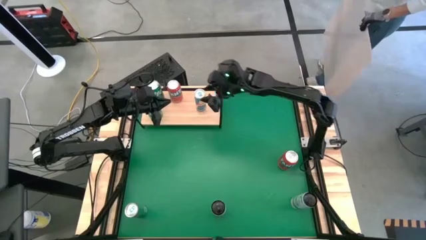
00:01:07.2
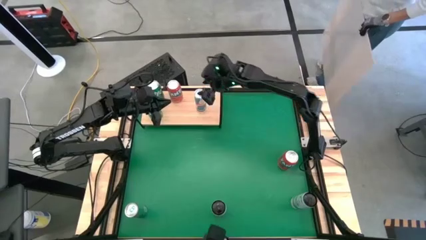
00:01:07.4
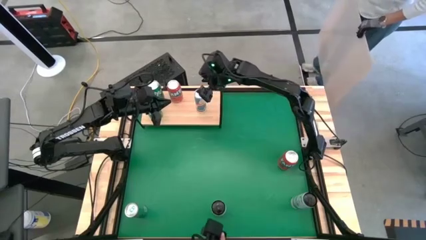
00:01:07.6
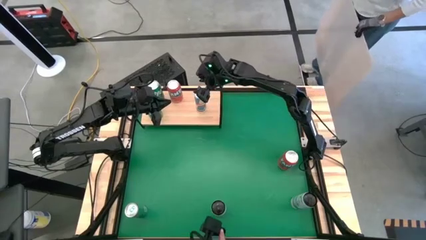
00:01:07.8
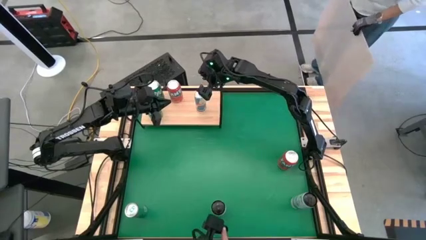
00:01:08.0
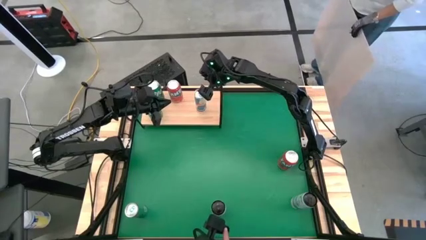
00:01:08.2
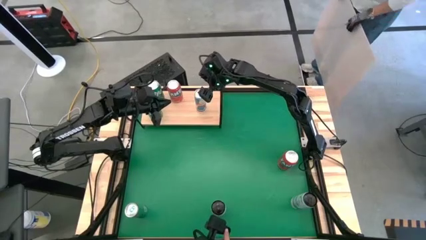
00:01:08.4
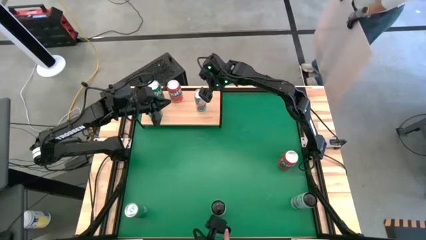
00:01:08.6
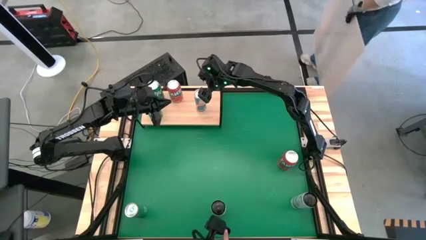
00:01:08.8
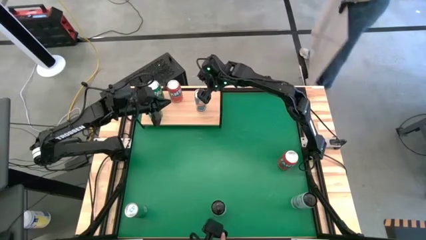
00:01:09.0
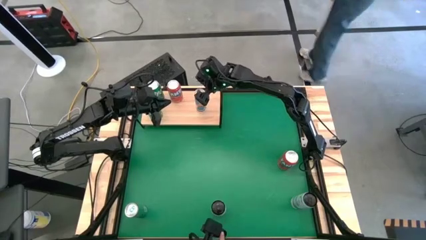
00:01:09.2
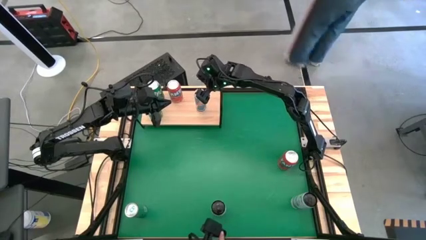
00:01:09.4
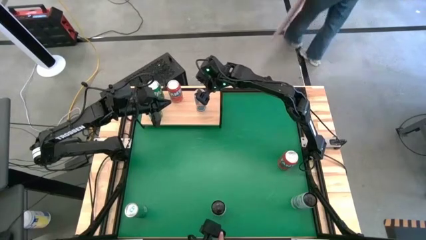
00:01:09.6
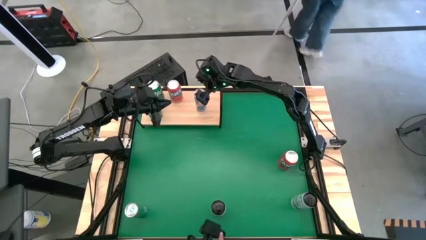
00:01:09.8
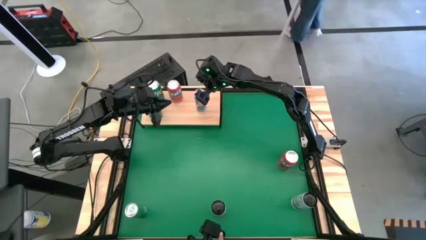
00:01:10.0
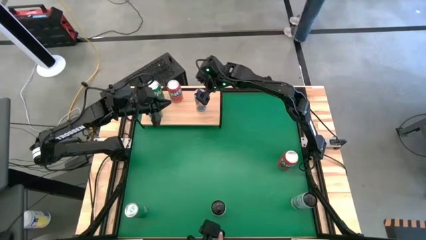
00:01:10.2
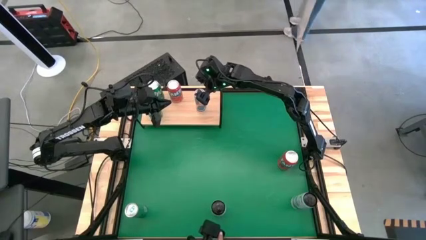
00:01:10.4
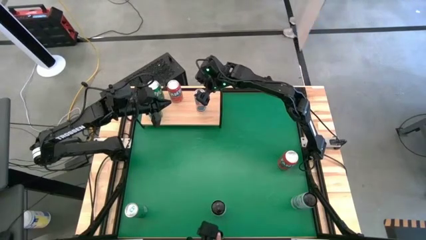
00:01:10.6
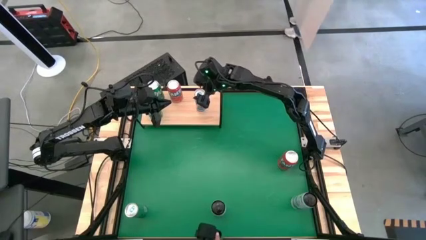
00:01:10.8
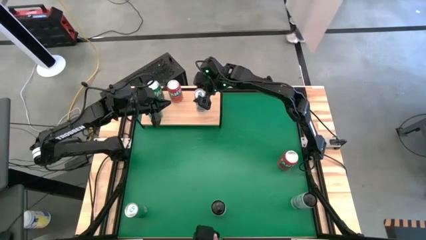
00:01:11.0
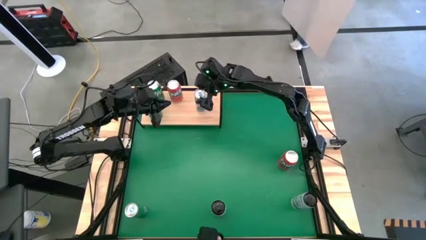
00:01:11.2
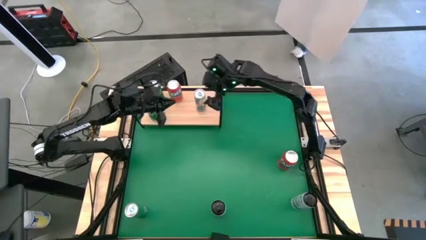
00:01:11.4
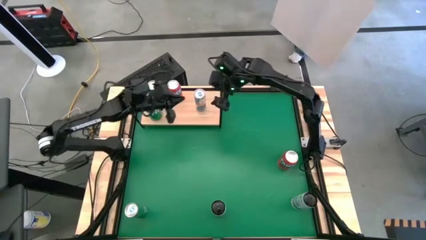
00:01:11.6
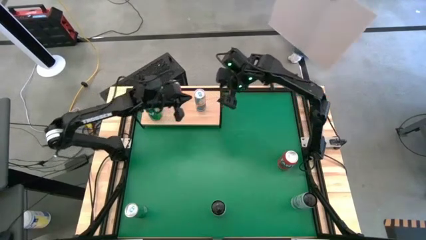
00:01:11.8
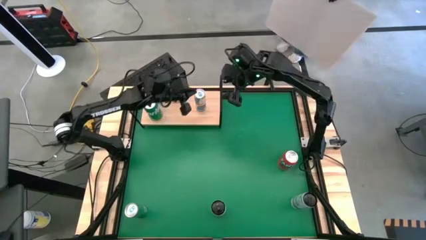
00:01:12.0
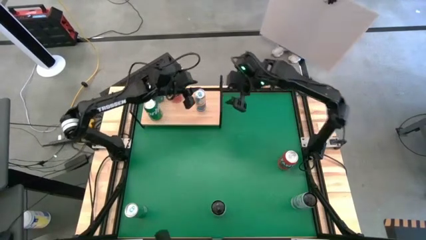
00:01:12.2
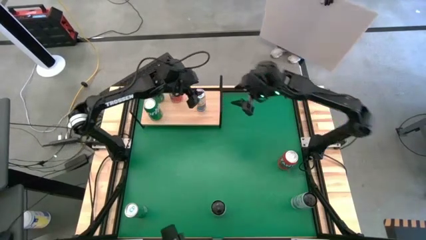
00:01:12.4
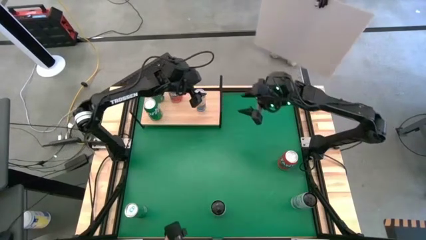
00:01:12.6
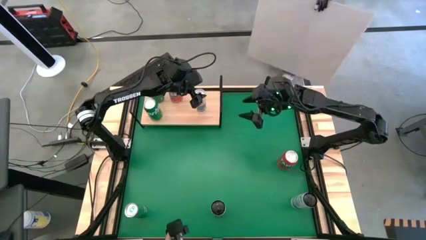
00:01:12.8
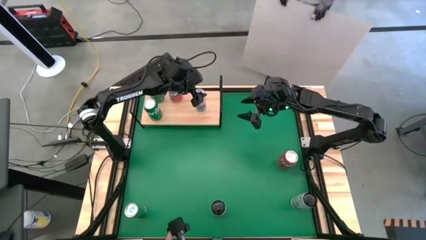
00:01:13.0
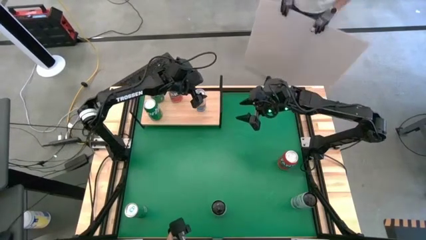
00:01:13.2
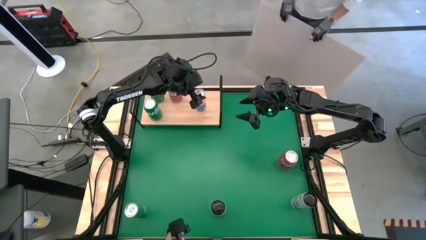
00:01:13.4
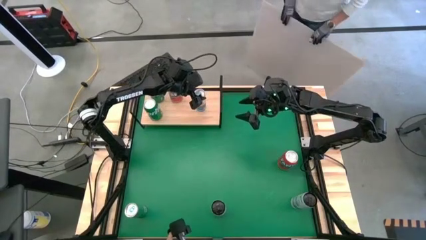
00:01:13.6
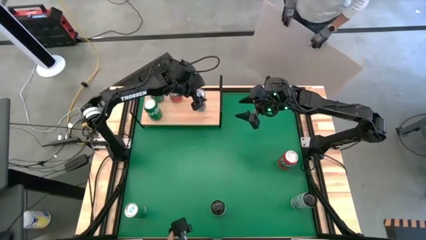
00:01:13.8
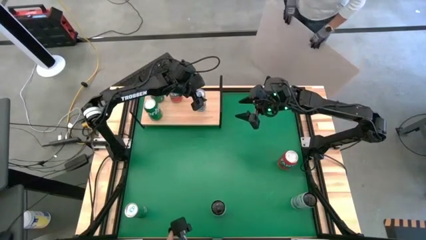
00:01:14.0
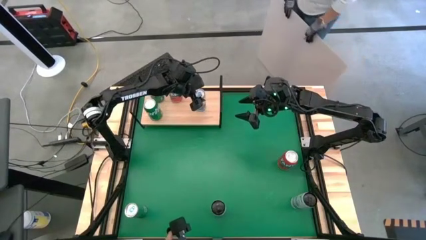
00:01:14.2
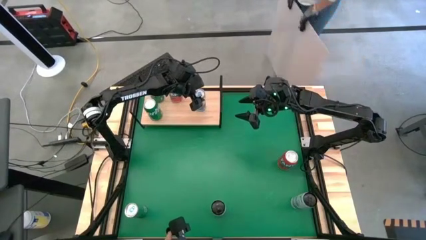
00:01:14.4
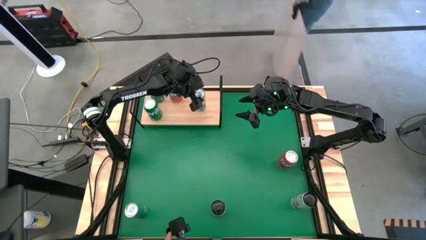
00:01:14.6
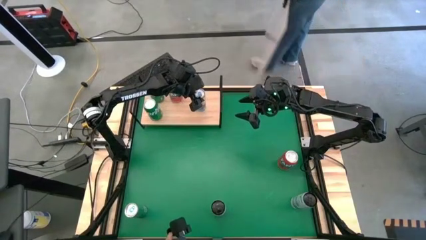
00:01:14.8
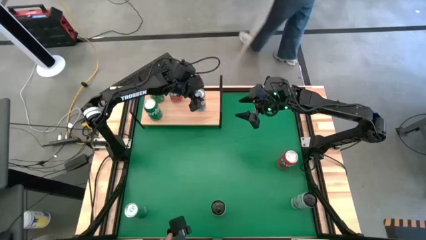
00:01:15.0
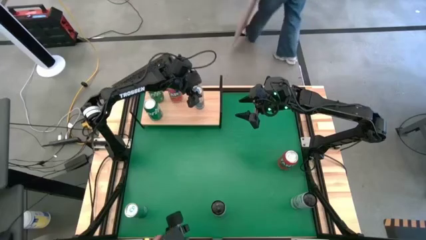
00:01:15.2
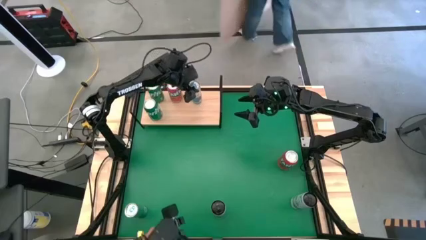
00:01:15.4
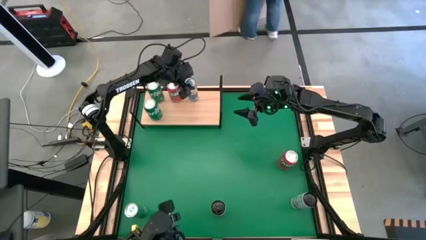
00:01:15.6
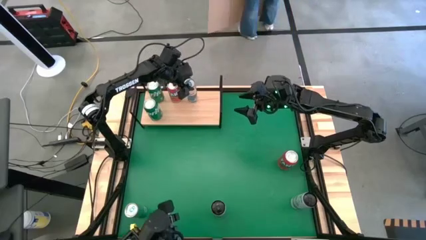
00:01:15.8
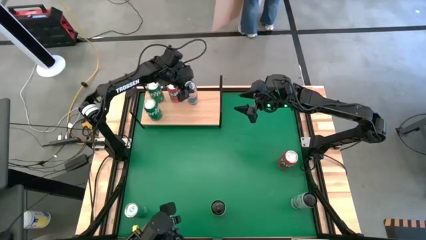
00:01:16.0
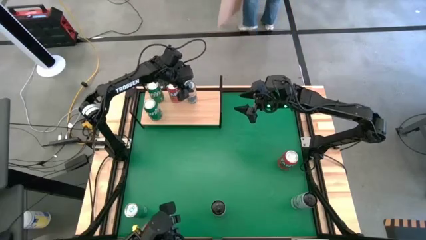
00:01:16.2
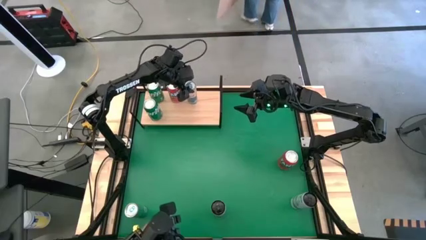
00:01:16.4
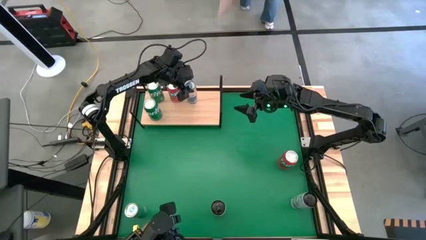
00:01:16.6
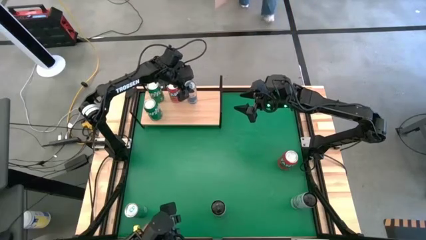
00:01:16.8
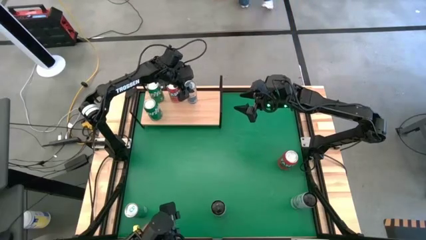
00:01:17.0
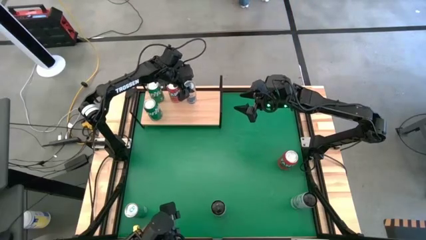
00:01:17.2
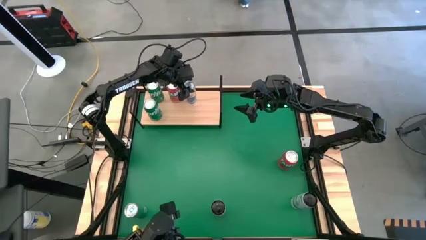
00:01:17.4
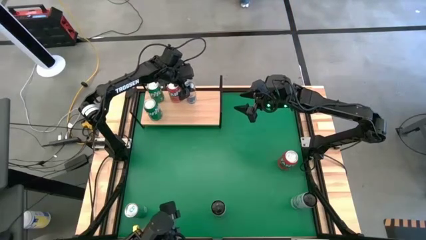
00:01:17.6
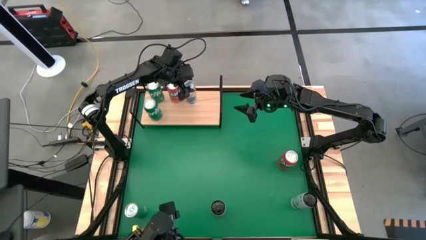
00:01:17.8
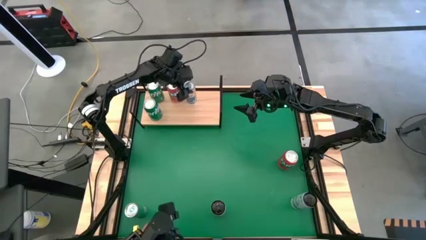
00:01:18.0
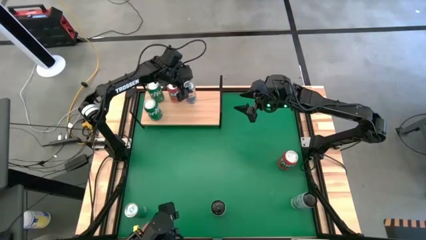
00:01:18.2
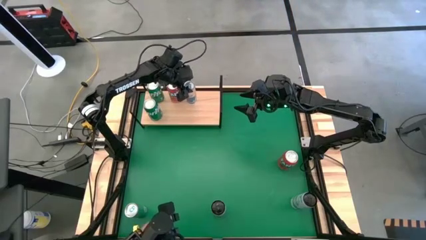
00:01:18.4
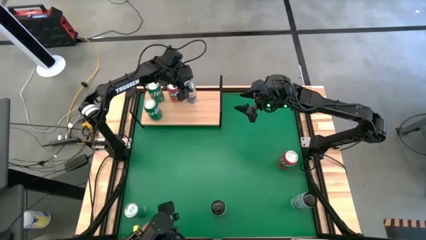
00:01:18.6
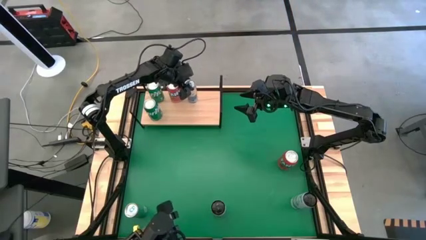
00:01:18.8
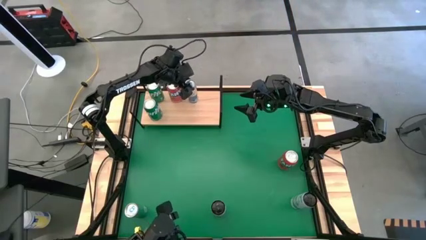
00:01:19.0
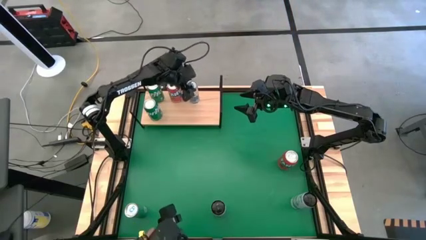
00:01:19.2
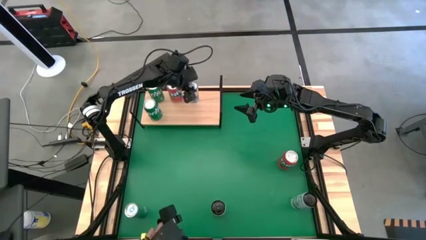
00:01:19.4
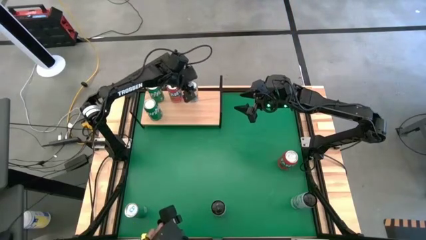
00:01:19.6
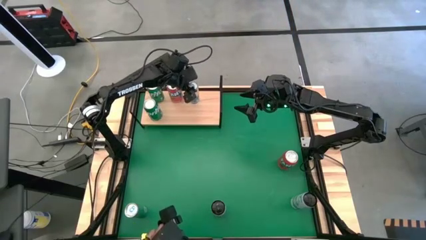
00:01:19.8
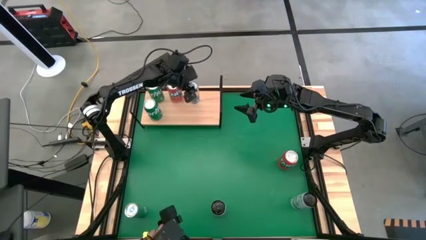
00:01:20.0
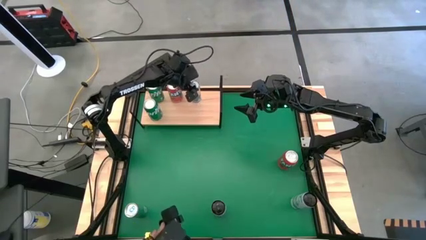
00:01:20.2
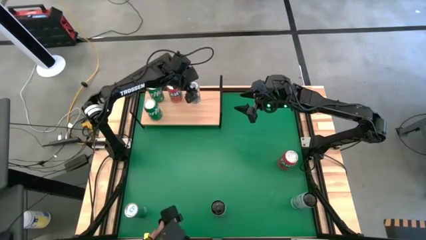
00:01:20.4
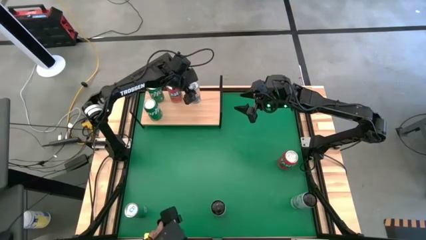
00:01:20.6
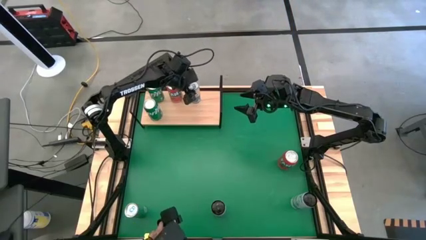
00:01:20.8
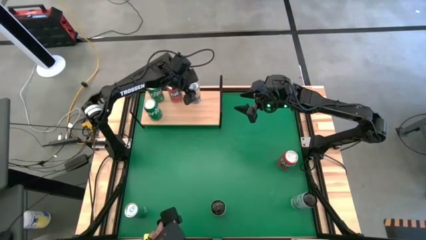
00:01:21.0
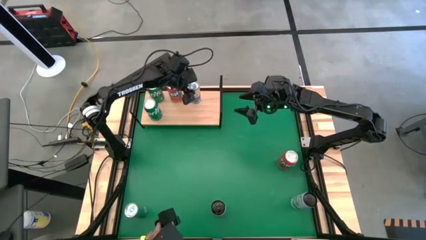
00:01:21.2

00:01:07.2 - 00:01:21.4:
Task: Place canned beverage on shelf
Put the top blue soda can on the shelf
